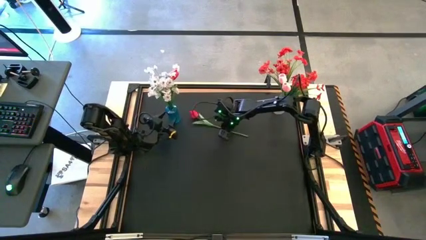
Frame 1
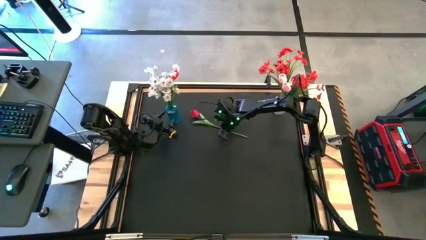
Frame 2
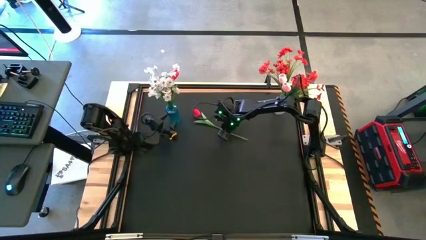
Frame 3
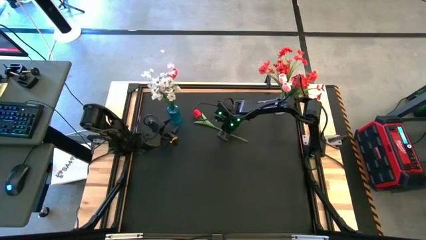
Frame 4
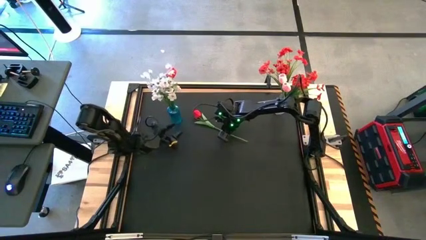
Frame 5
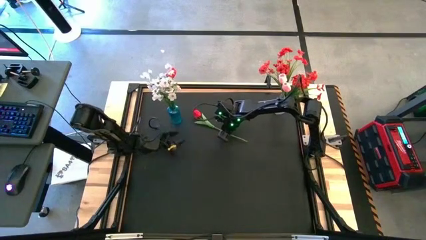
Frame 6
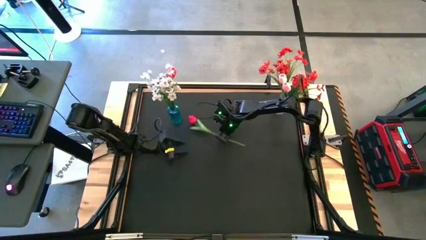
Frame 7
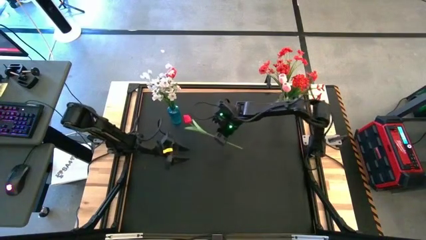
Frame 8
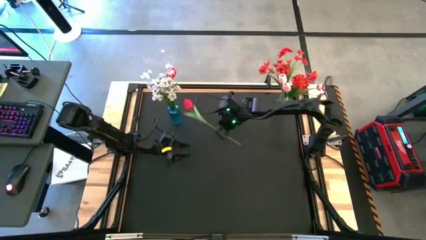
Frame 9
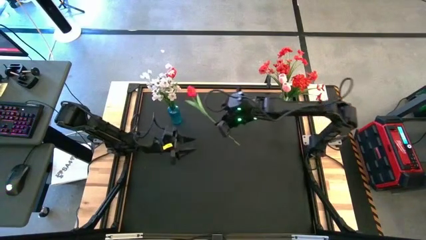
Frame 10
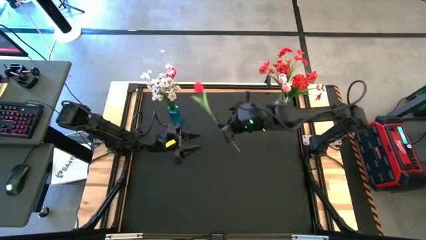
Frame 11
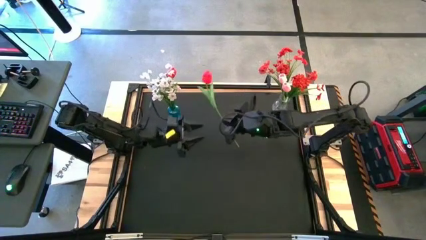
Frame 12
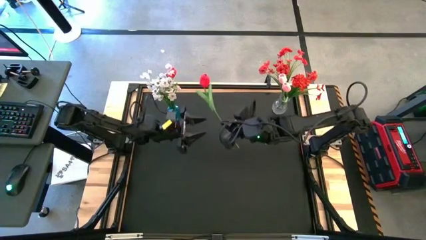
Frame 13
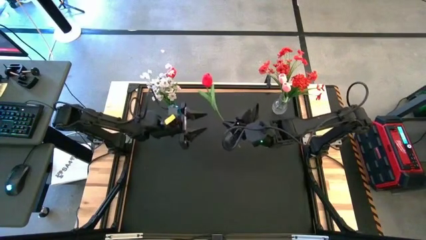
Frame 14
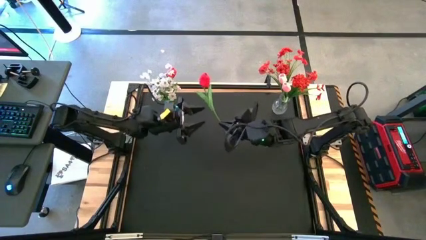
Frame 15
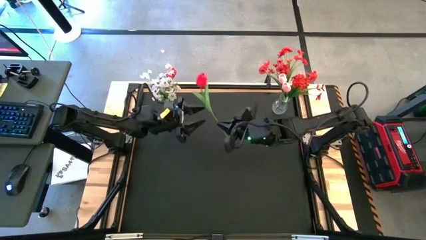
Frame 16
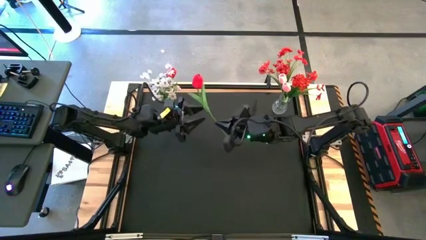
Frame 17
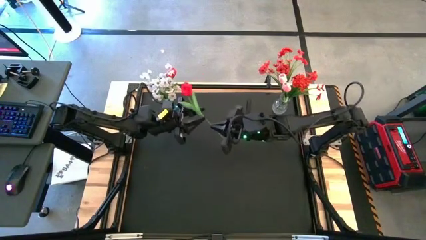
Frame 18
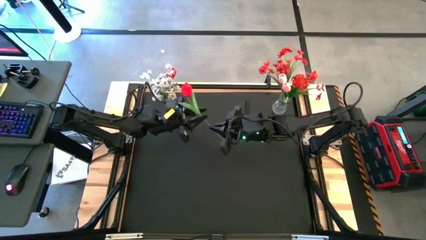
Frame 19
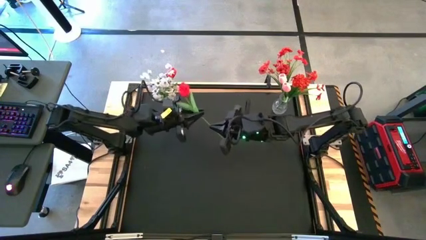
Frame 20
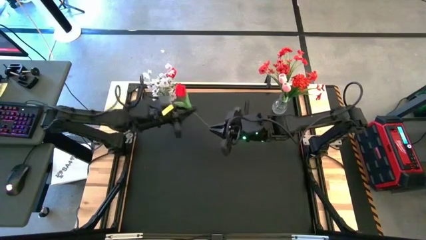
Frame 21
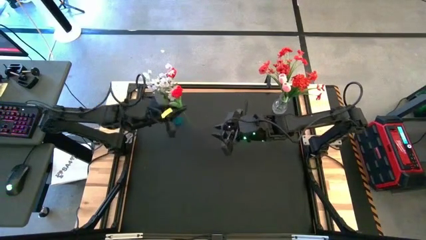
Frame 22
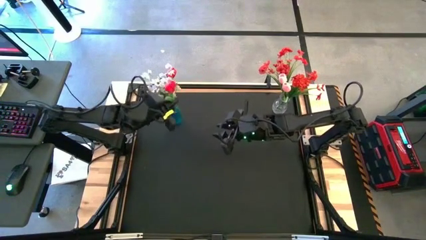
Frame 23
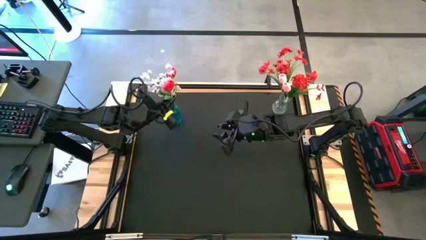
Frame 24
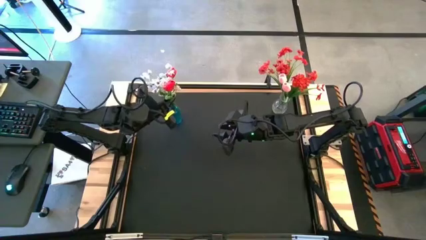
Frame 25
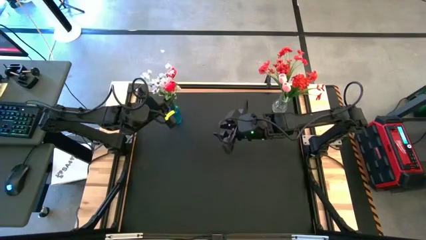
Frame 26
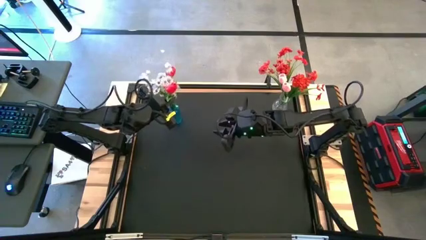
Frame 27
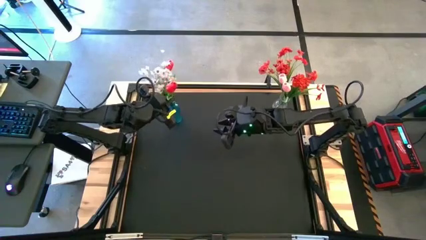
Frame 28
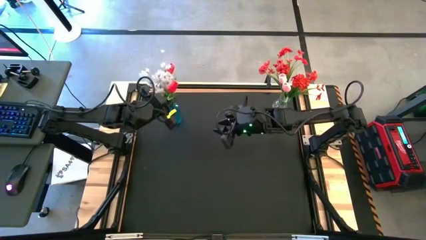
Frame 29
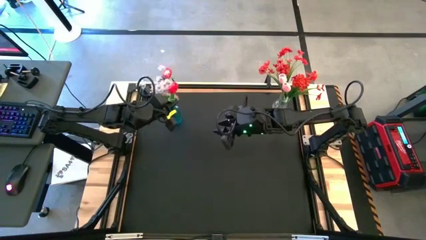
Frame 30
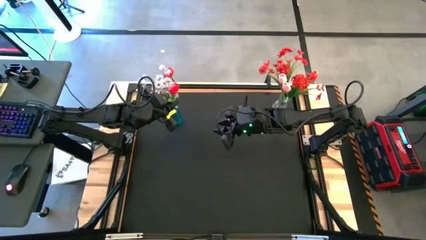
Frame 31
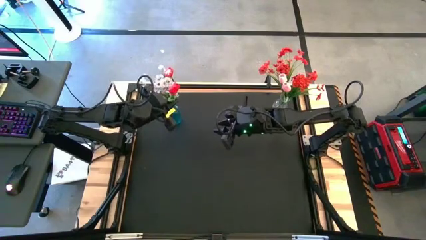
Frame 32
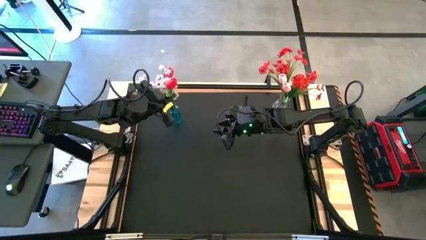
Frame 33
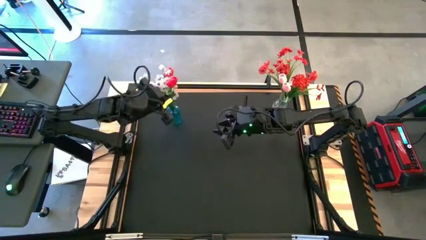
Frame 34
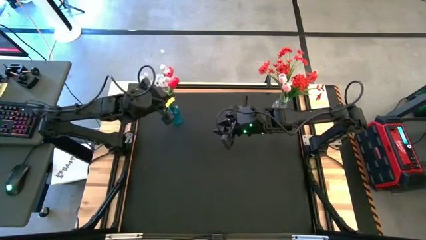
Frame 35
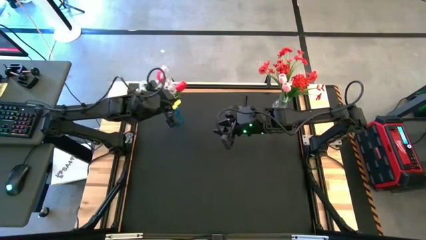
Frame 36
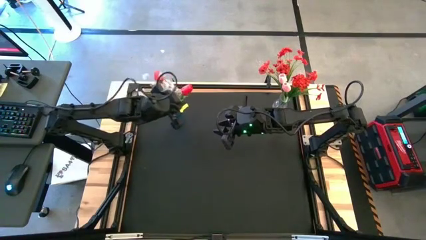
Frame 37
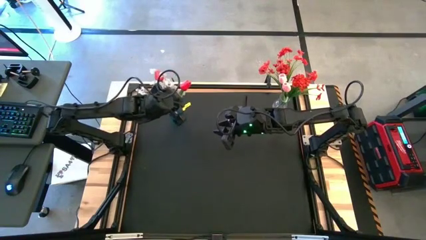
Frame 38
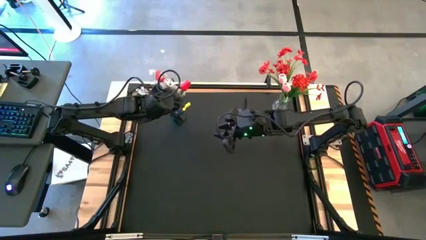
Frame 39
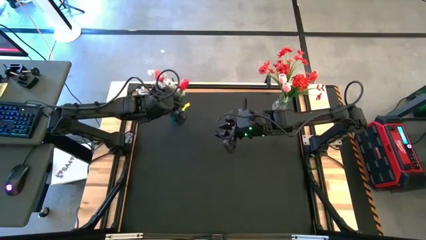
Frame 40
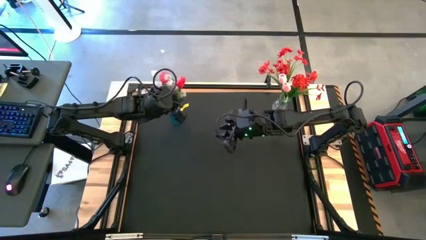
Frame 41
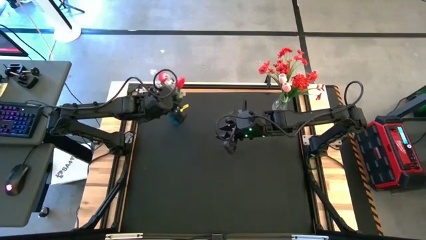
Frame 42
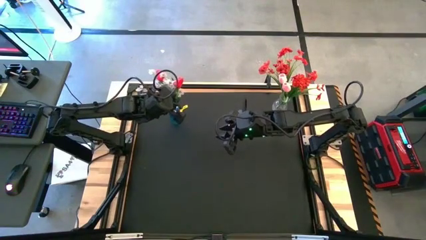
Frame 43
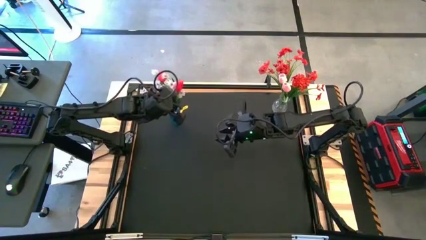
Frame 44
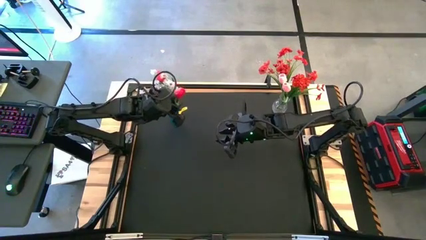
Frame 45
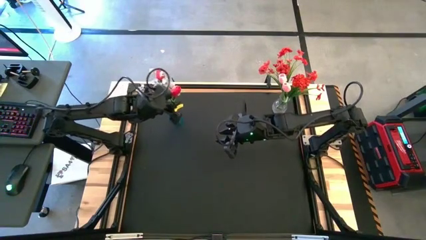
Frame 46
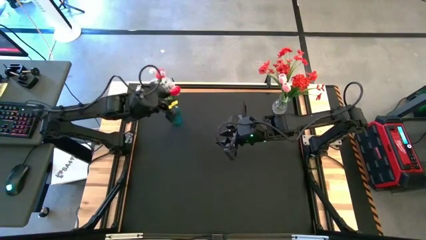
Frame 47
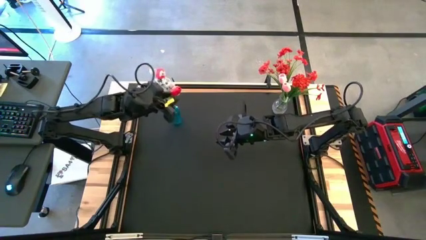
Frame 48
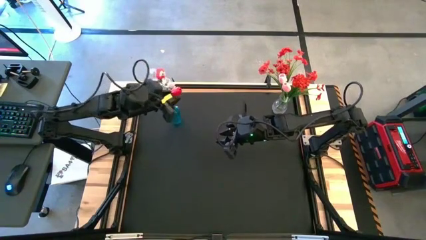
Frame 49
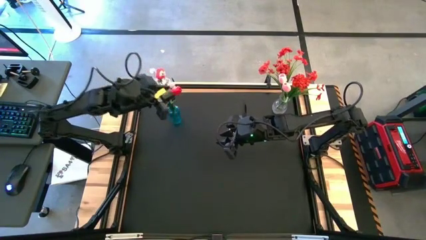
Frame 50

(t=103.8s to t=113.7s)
Task: Sort flowers into vase by color
Put the red flower into the blue vase
